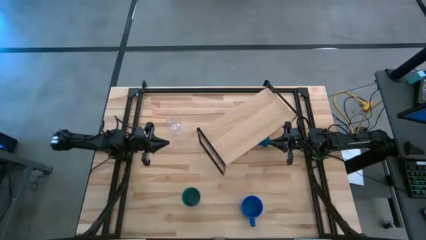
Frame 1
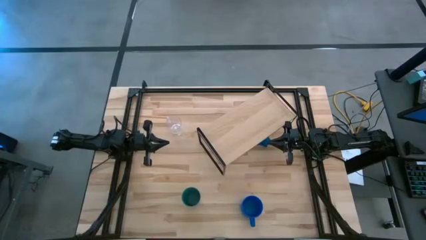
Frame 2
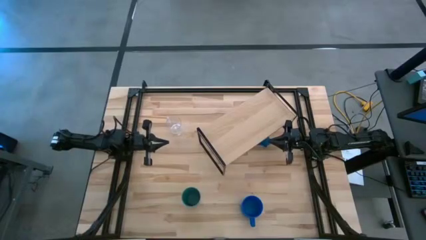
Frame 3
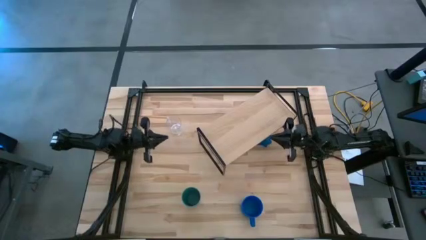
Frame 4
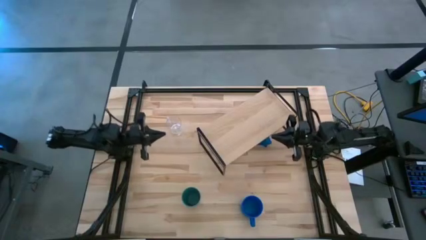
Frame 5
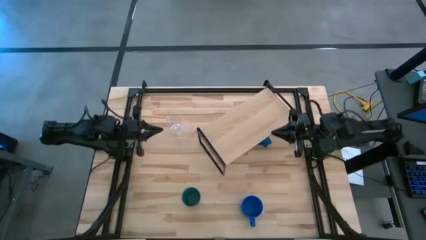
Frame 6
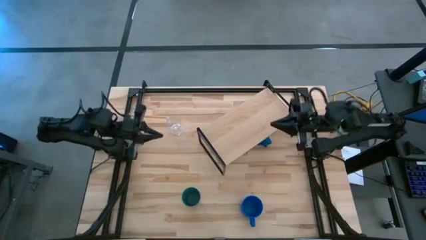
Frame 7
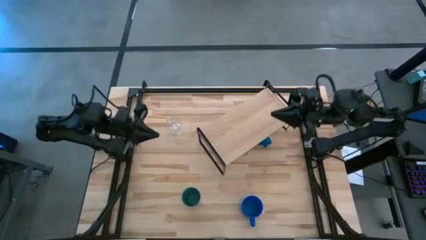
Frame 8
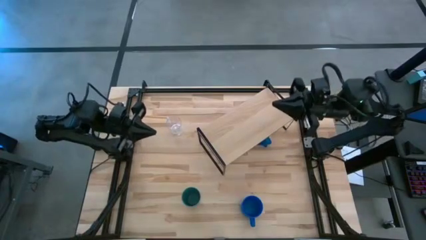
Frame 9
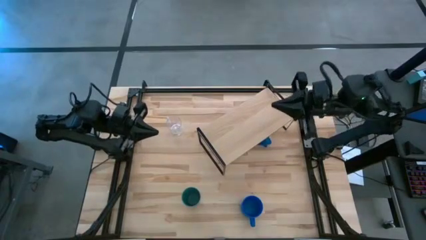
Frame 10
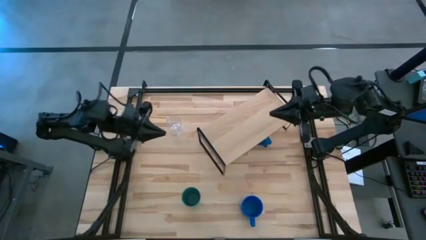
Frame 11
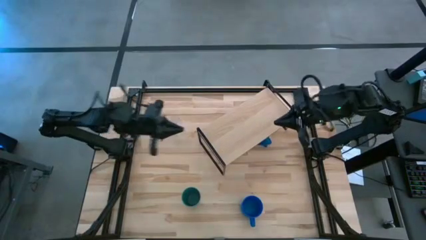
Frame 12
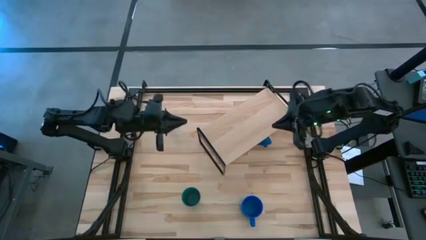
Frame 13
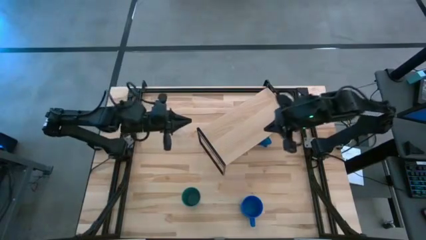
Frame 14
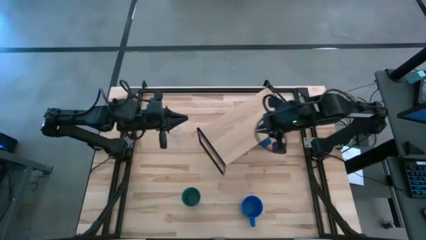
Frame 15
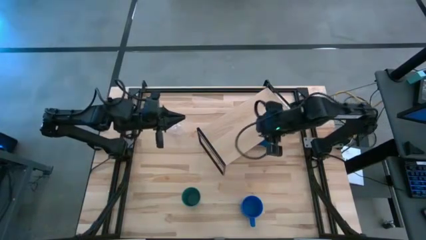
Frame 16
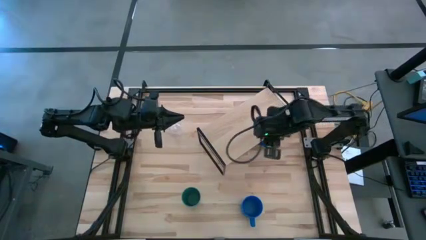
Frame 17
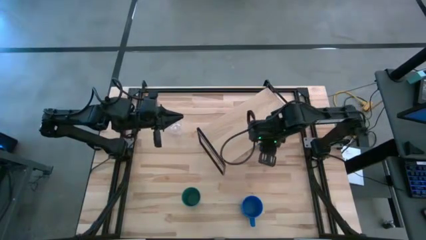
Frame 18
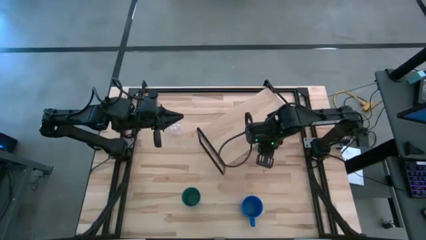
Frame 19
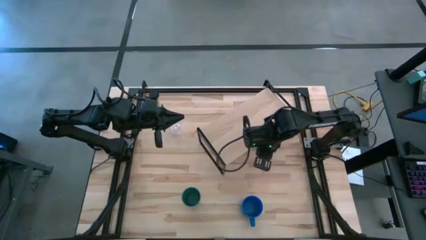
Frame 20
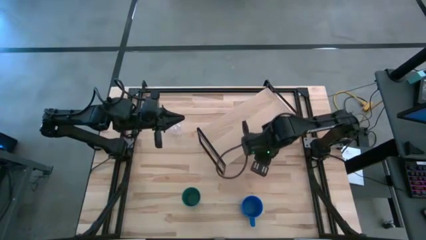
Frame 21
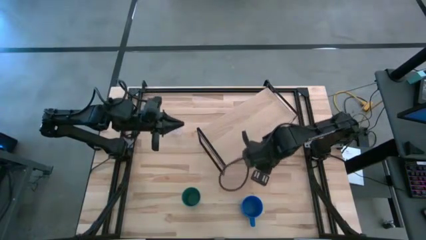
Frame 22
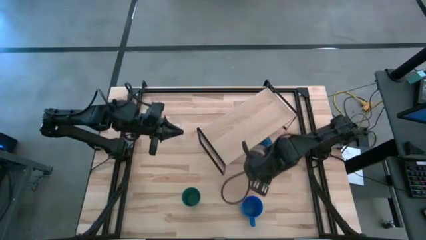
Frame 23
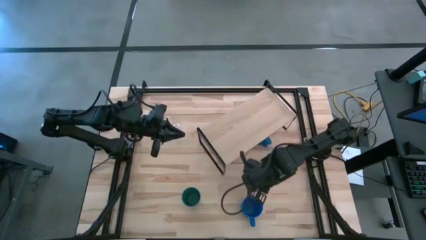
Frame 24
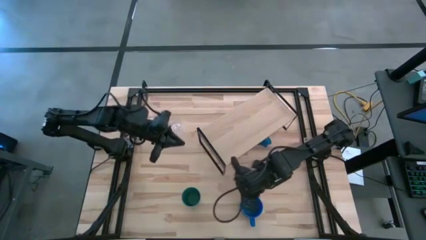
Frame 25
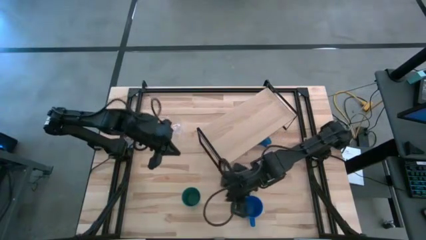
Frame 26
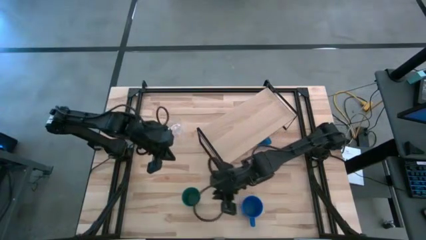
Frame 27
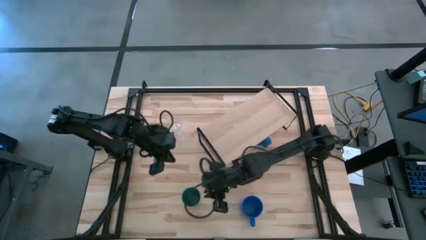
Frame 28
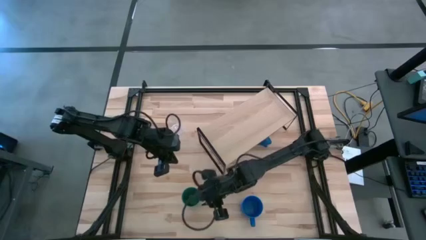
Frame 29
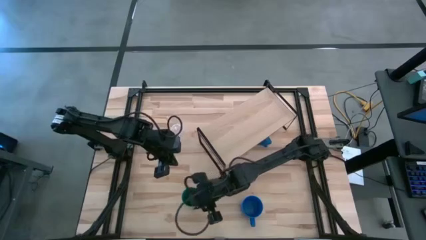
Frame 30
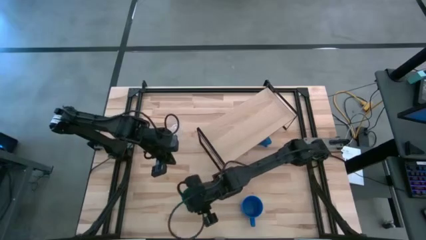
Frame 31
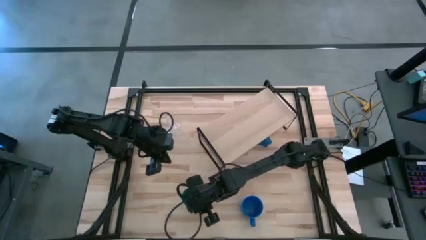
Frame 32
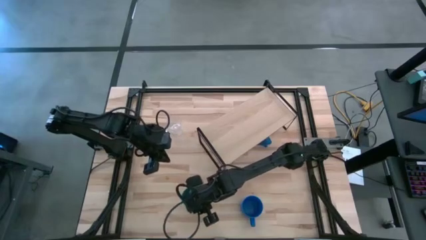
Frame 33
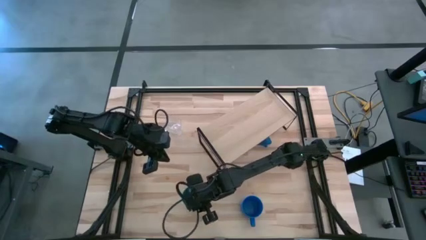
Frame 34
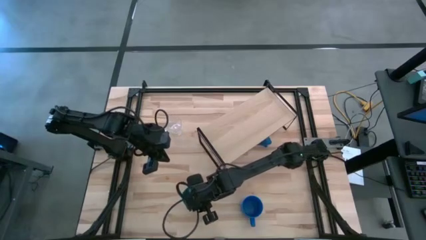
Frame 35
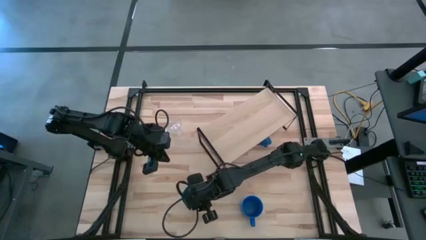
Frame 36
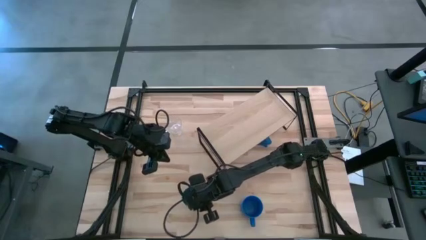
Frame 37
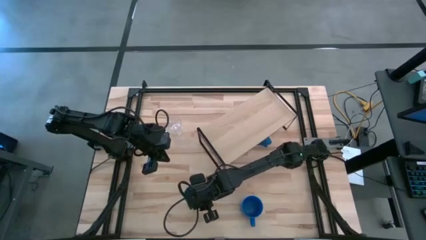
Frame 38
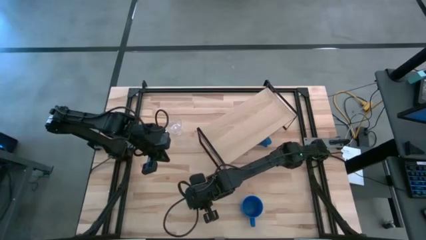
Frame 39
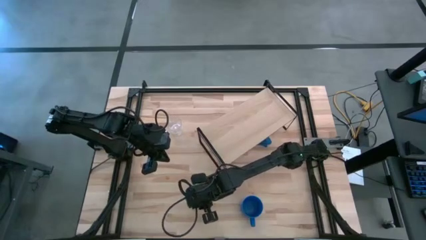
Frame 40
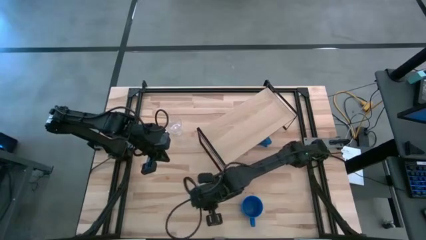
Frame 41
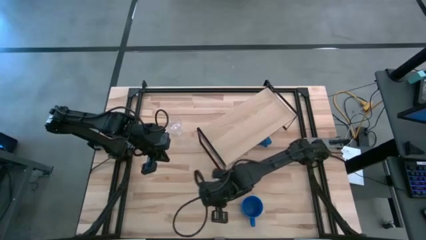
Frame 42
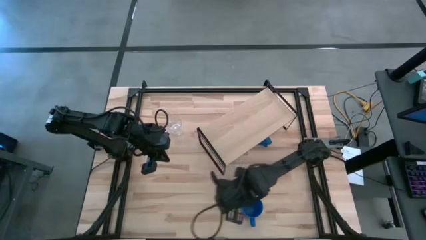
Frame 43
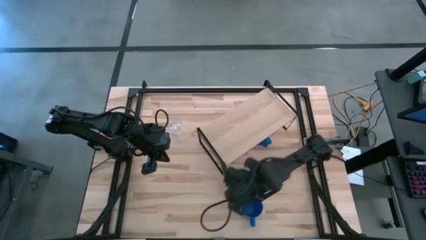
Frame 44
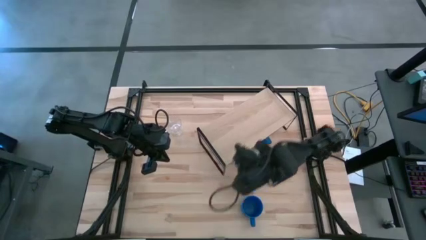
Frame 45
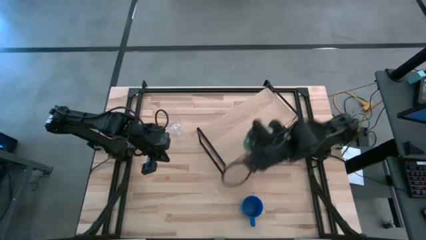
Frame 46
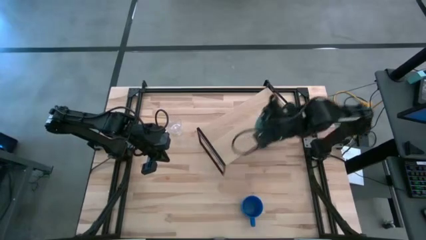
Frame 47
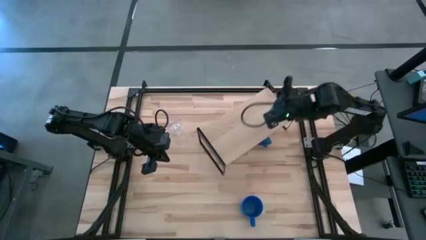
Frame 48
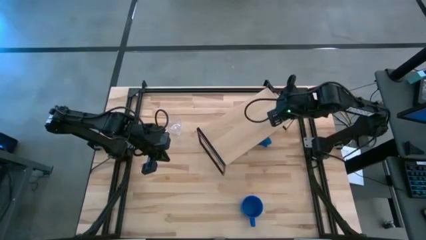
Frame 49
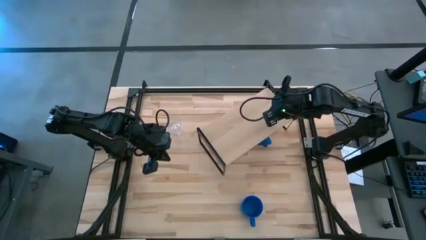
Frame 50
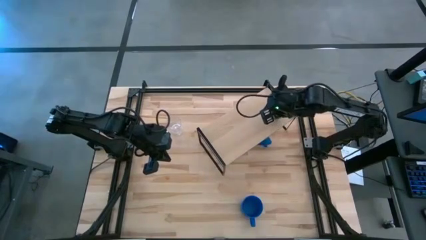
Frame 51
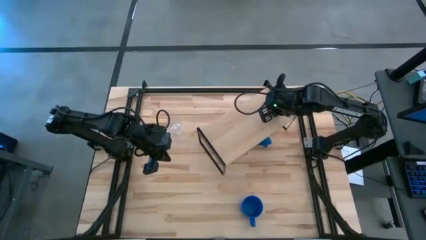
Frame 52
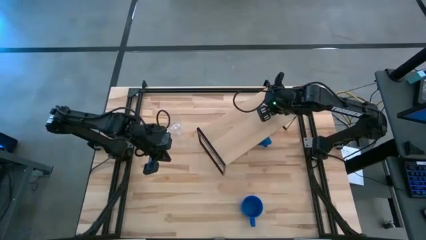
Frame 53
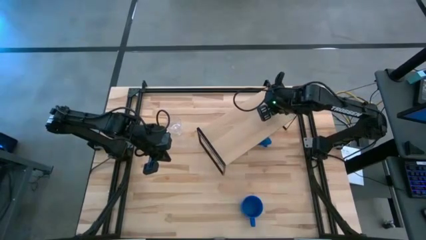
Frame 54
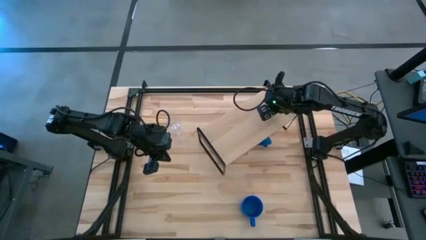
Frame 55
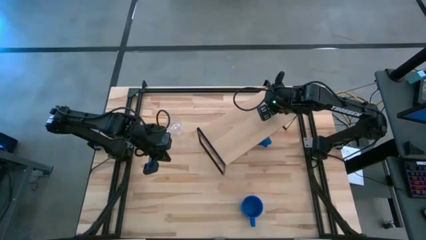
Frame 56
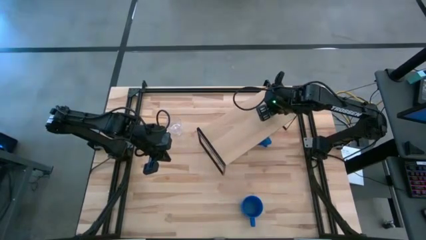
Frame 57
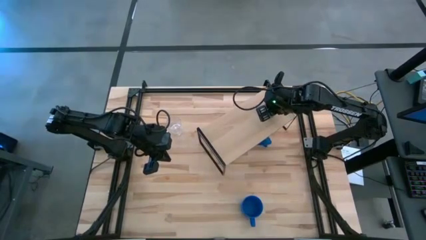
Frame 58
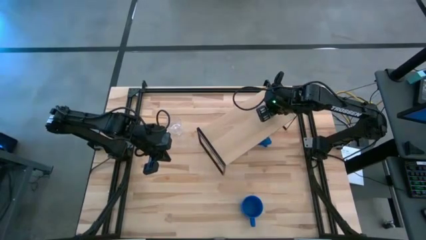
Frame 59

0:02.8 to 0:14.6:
Task: Stack small to large cups/mugs on shelf
Put the green cup on the shelf

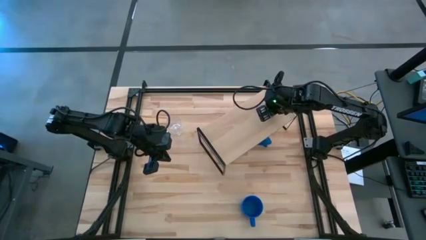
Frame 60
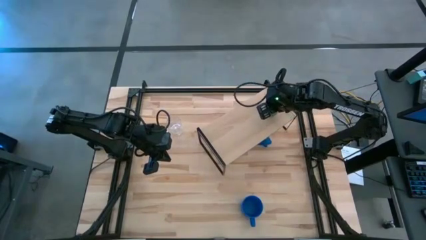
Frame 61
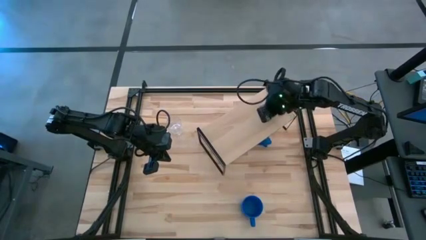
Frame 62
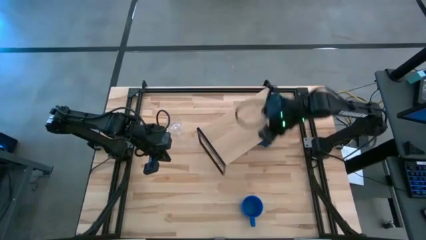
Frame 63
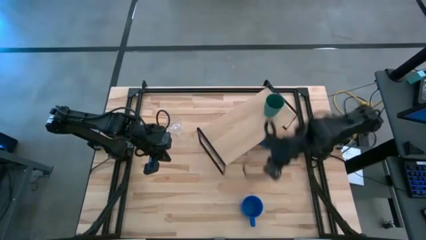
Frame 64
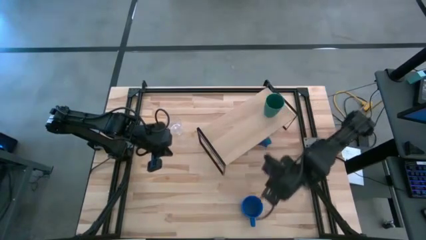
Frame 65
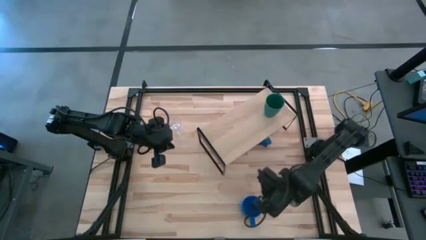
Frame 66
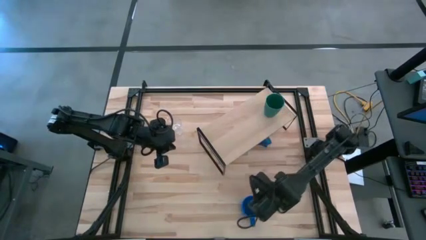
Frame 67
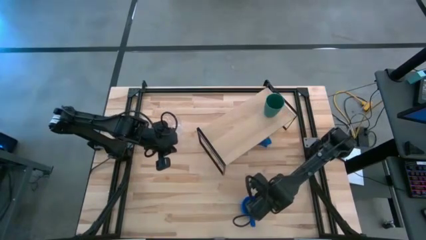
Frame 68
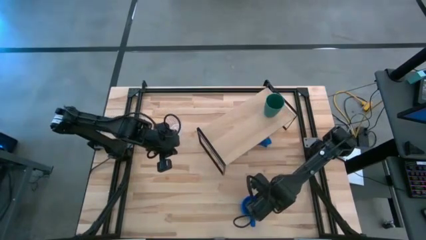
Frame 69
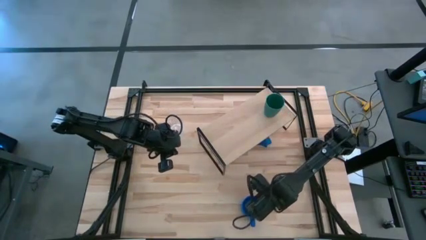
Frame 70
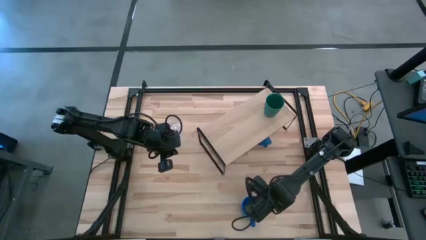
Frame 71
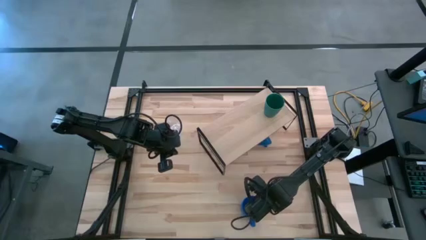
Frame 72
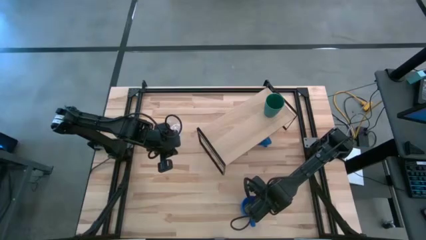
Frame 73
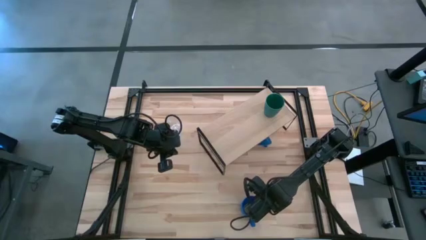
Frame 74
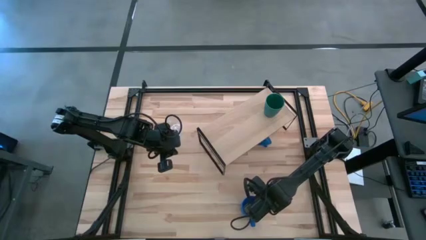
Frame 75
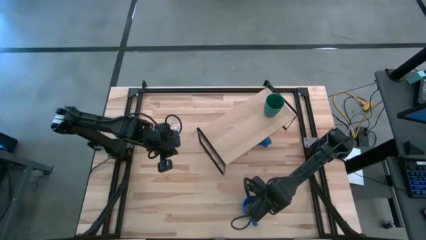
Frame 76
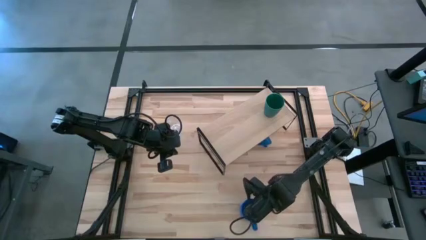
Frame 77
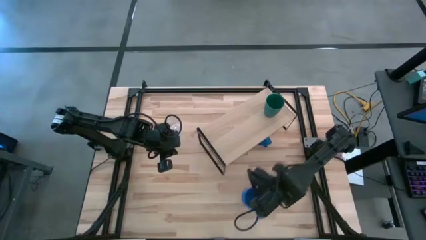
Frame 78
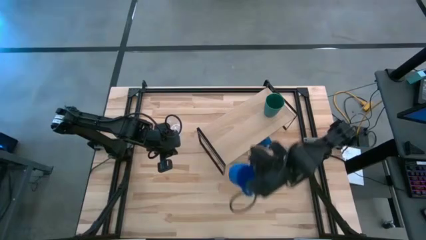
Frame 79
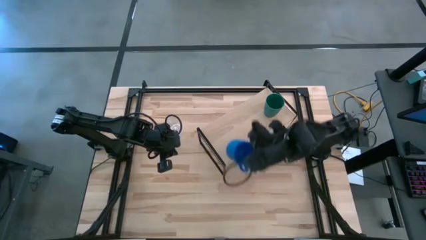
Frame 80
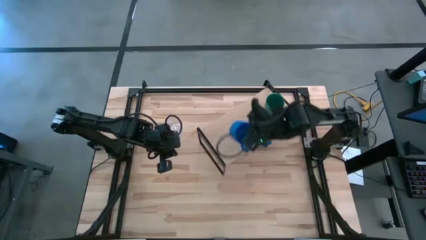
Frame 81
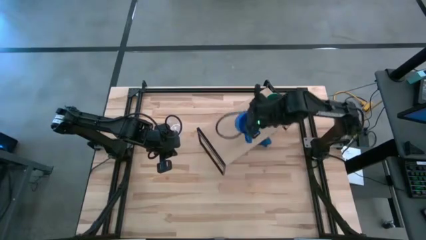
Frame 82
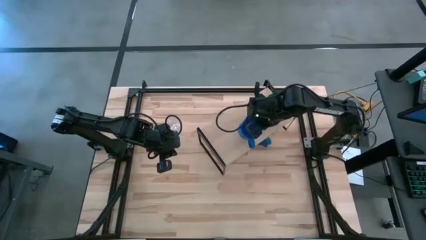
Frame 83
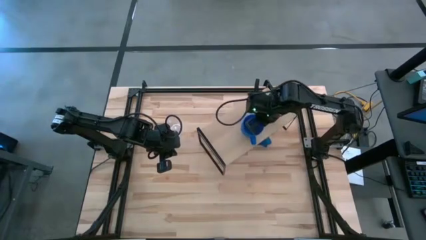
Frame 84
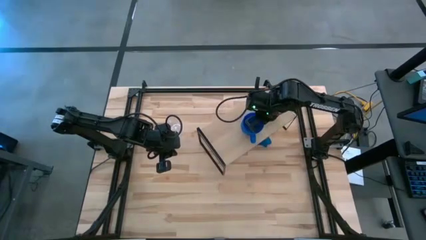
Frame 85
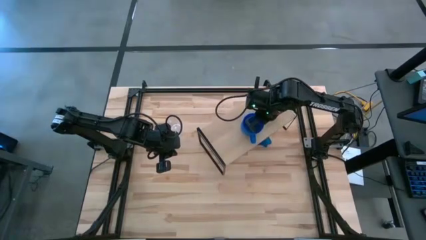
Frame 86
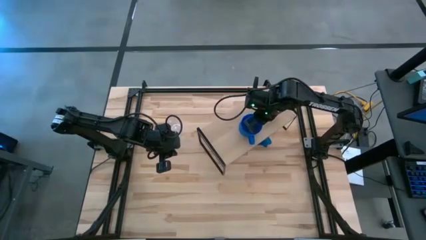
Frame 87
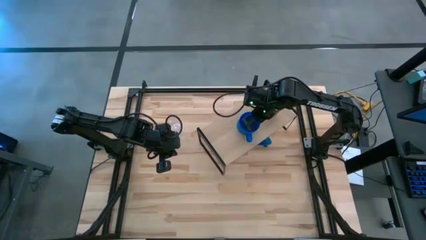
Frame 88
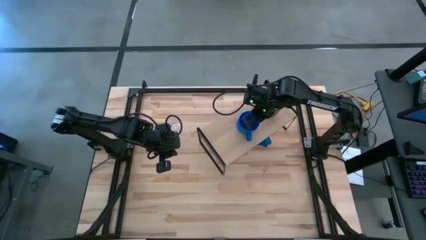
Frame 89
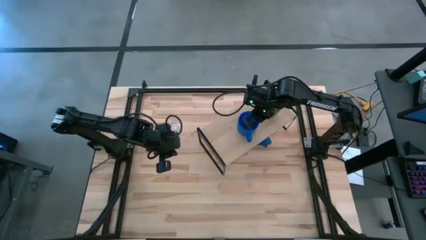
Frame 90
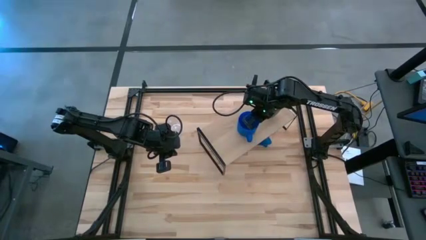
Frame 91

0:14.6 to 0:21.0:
Put the blue mug on the shelf
